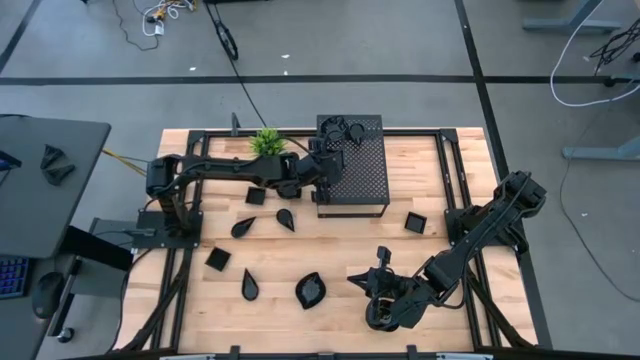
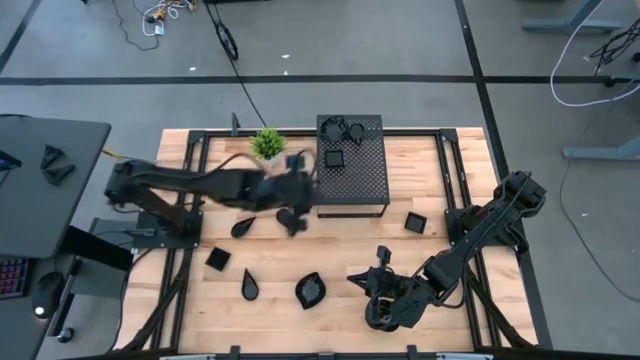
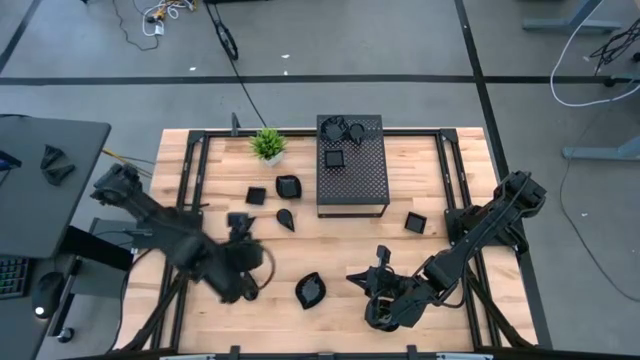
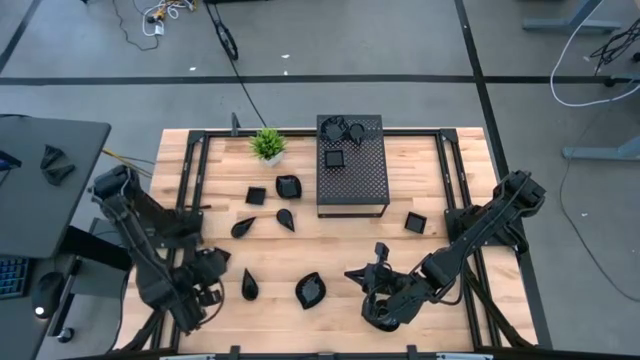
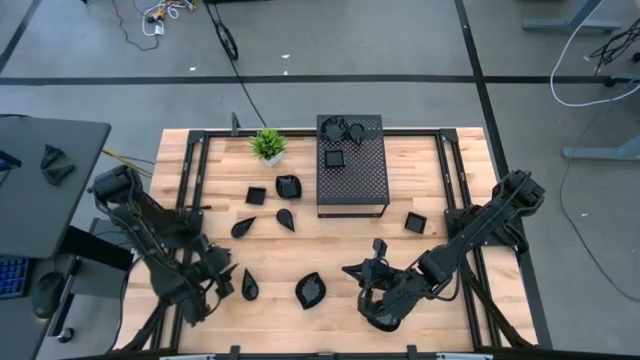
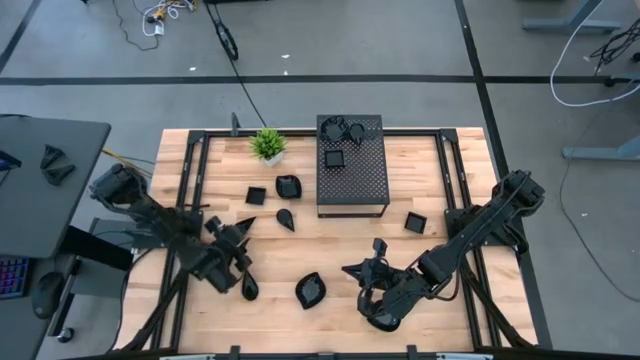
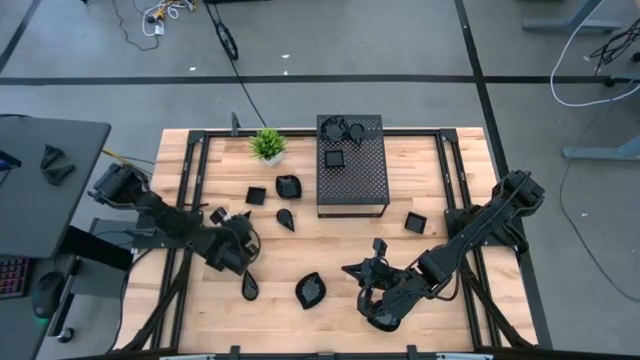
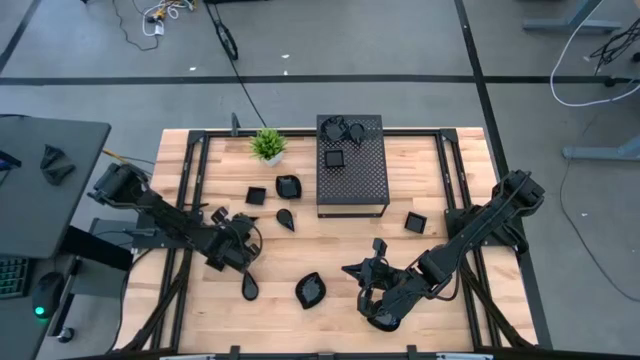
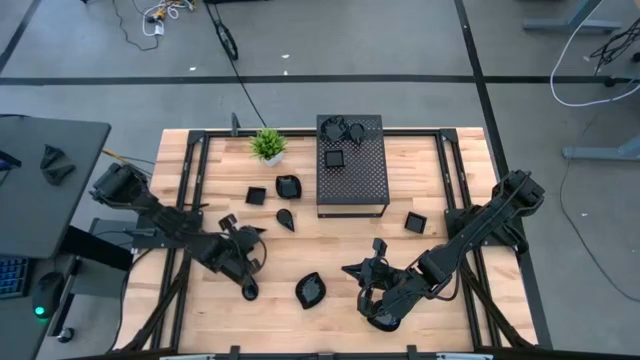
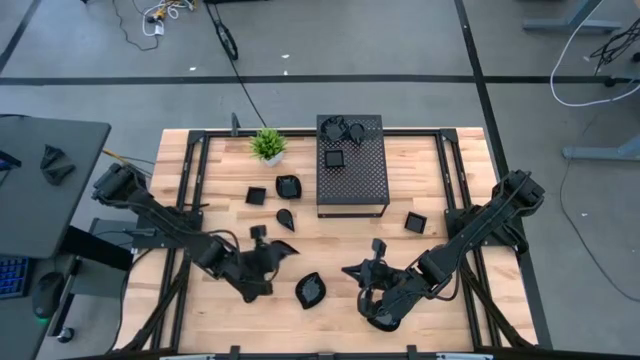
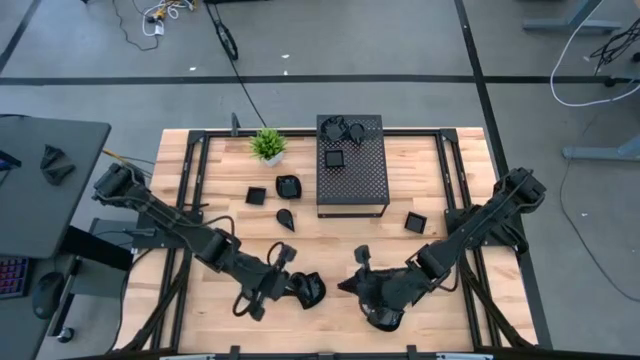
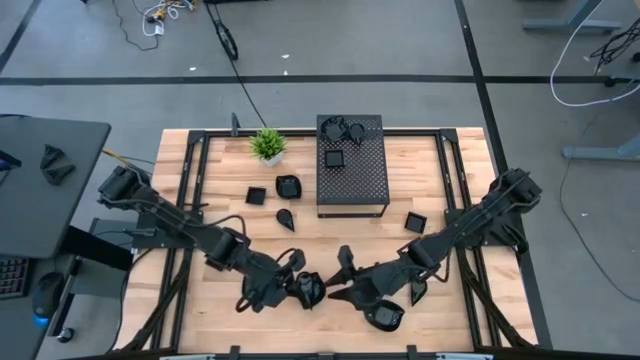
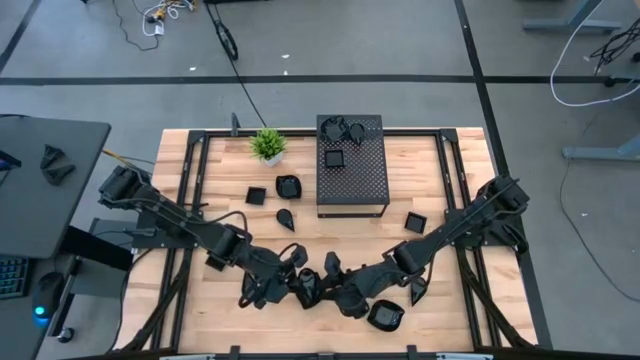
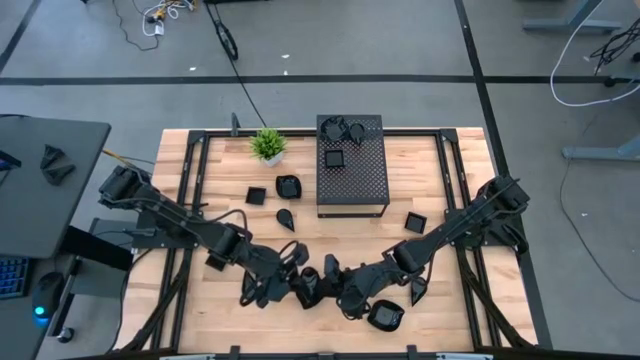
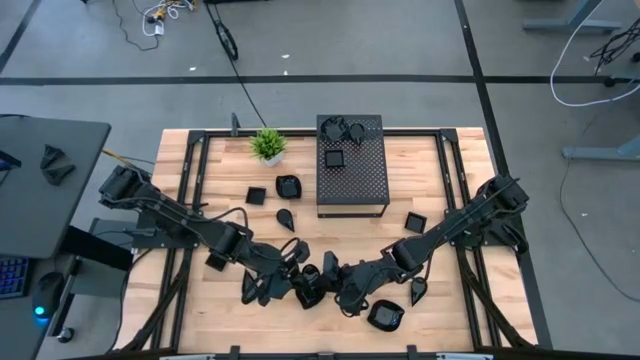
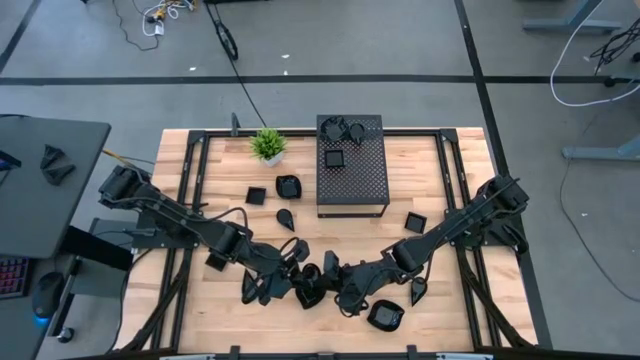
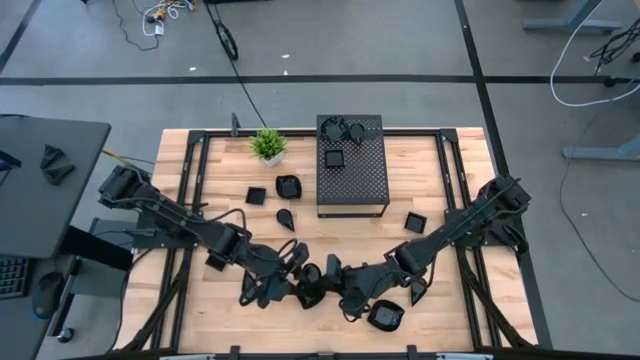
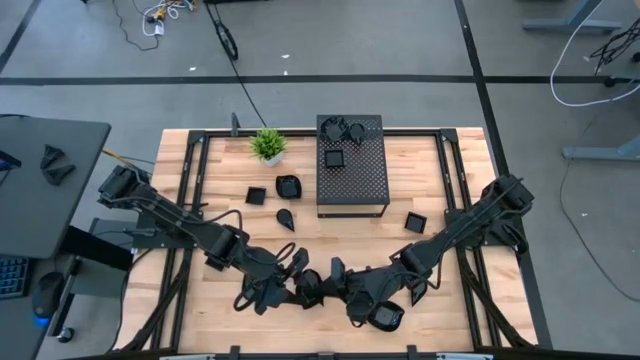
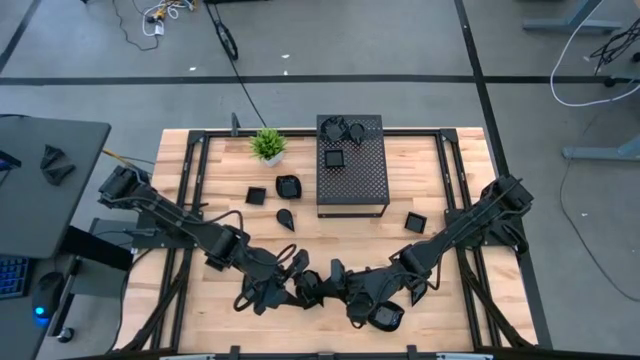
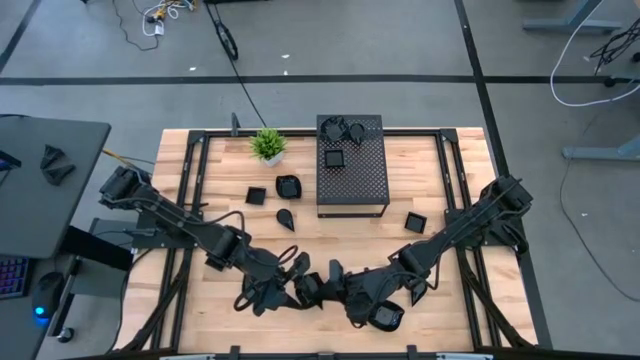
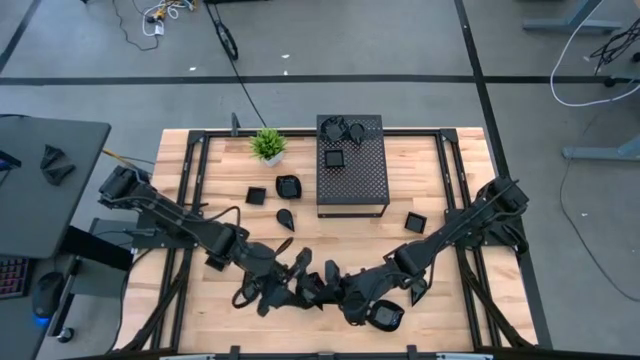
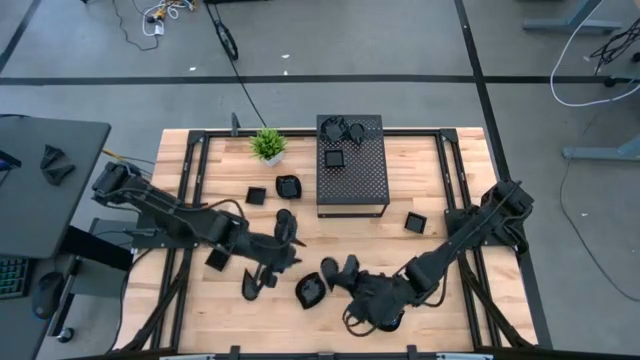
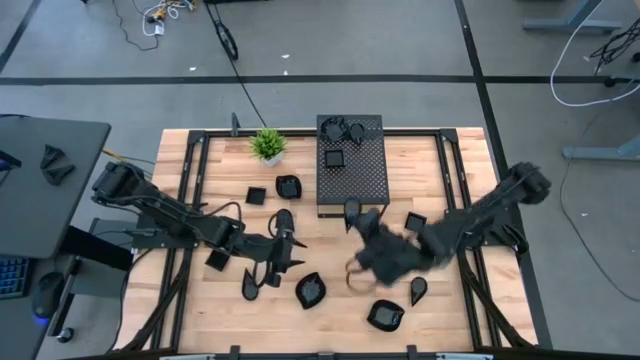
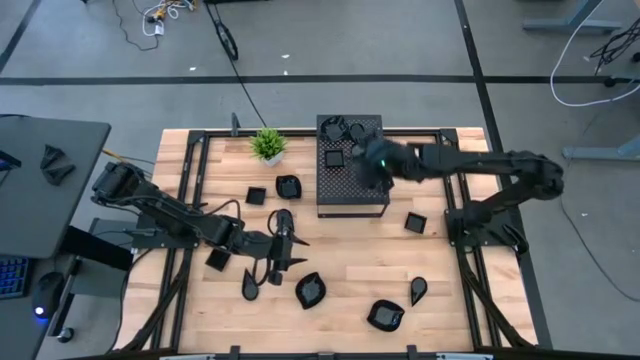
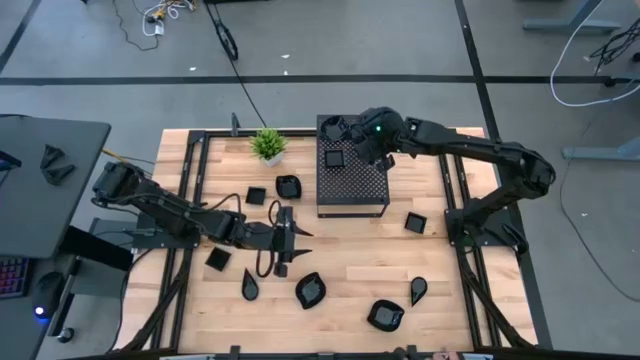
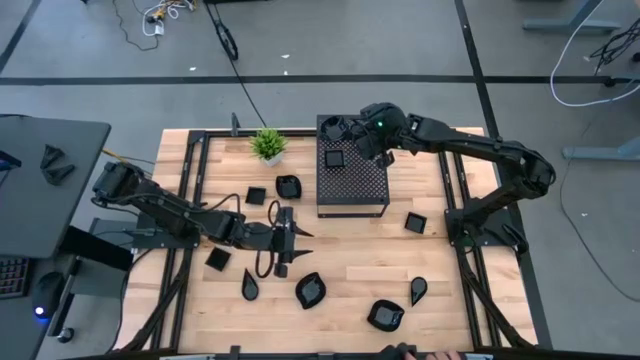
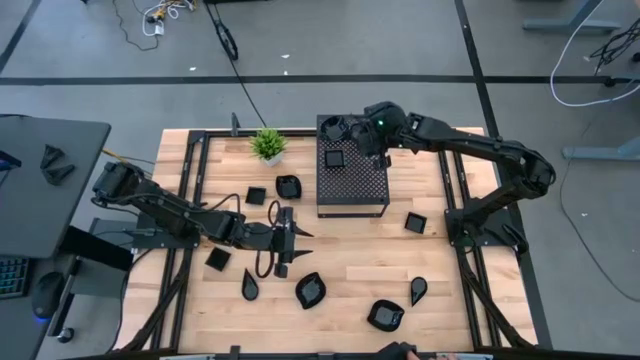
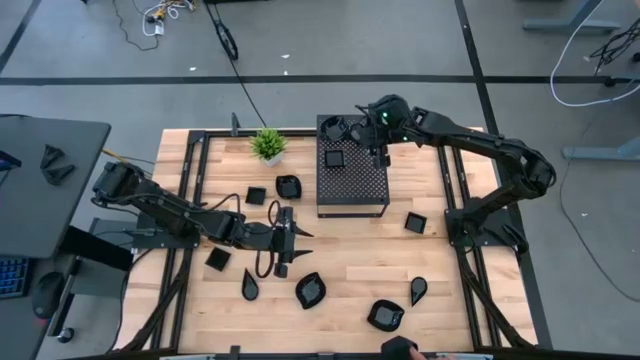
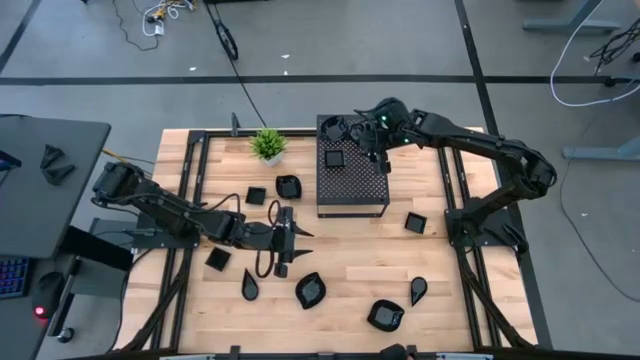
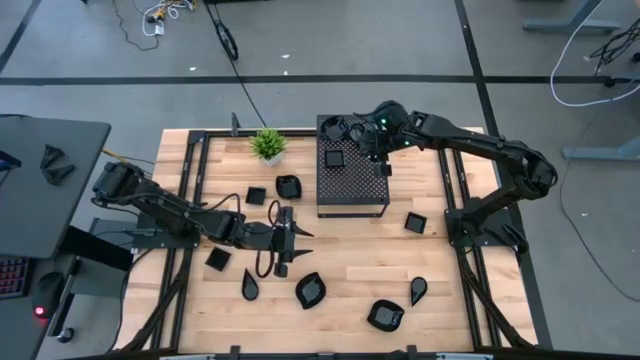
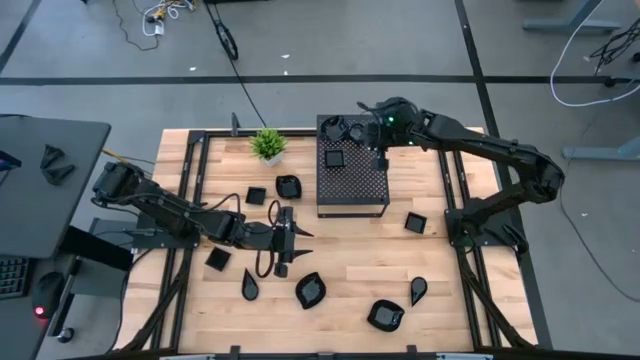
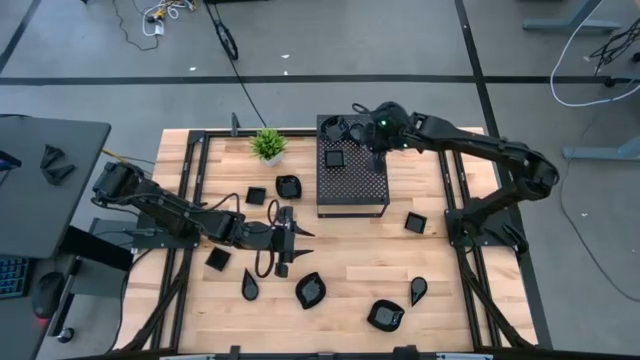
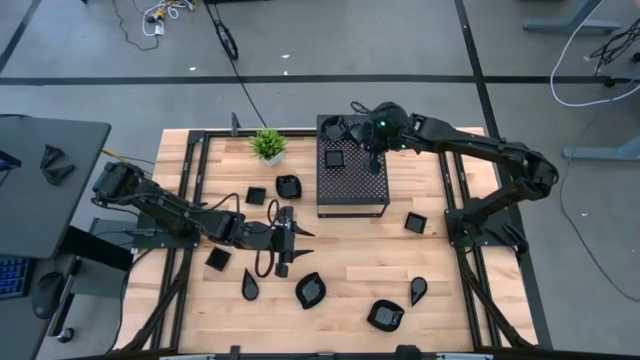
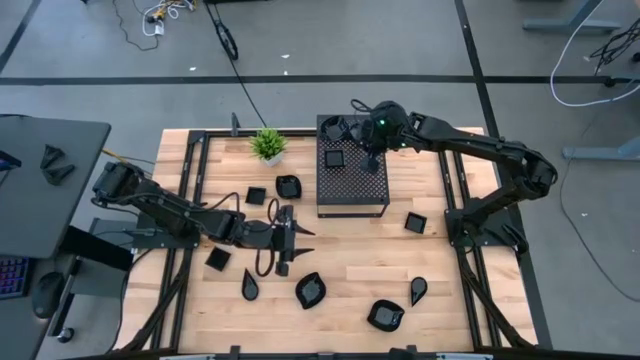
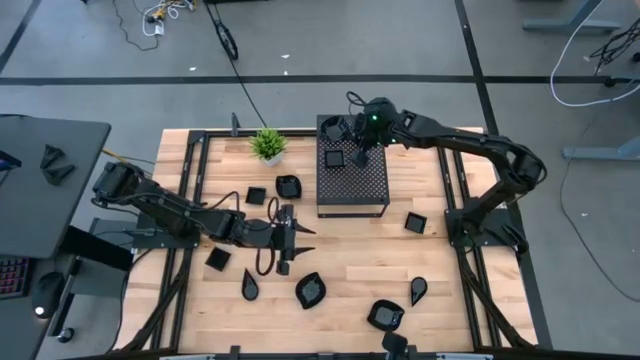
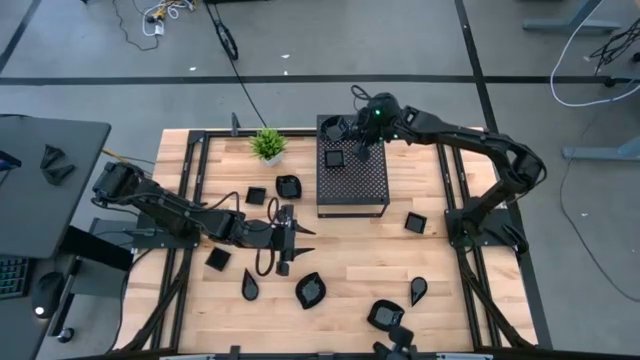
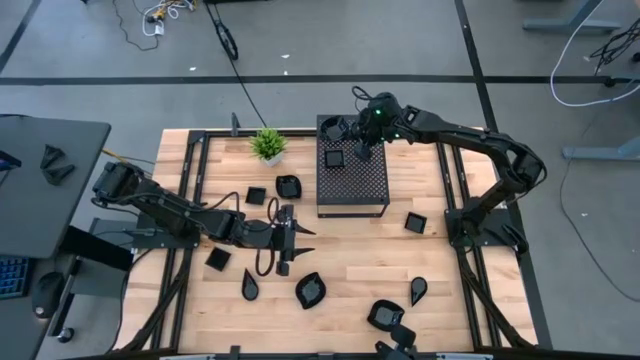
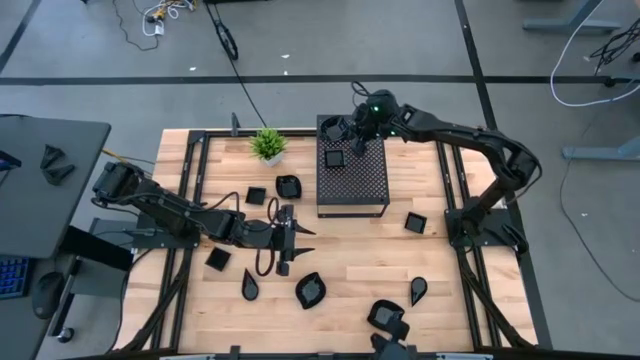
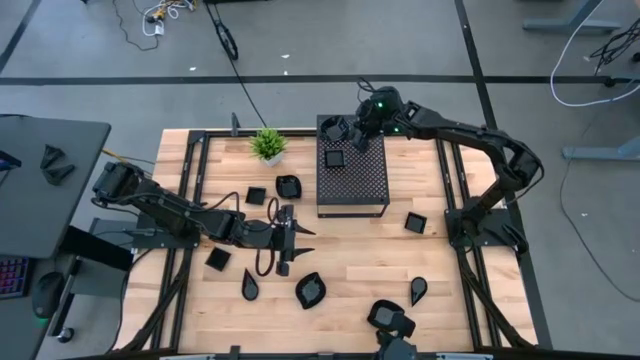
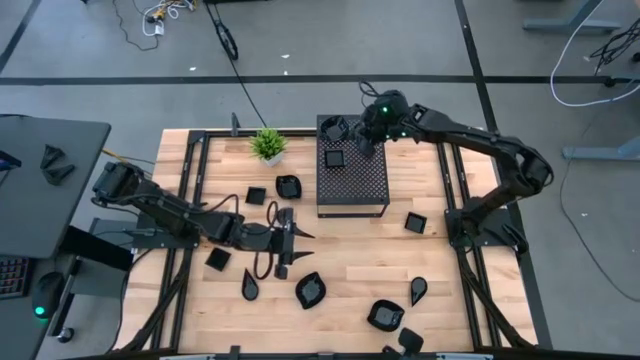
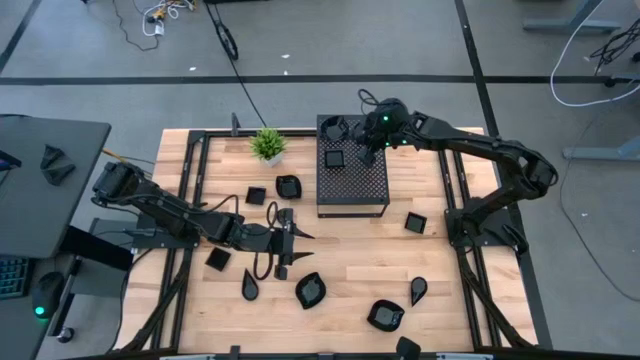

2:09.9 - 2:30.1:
Task: Pick & Place Mini shaped plates
Stack the drop shaped plate on top of the drop shaped plates on the shelf

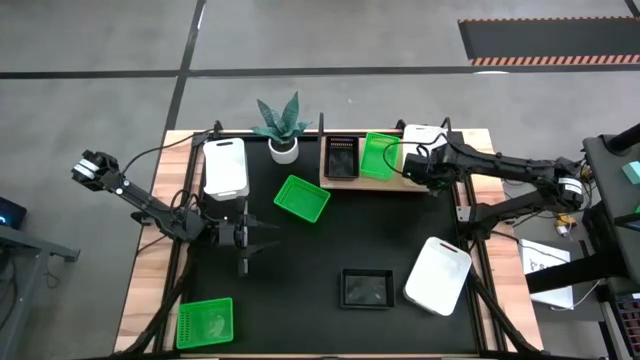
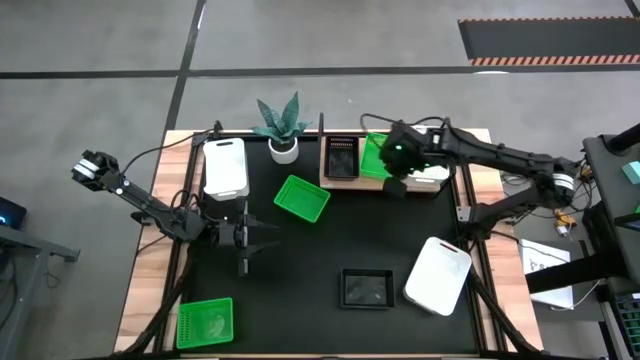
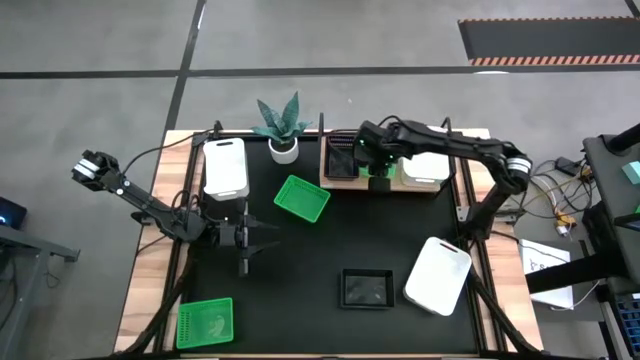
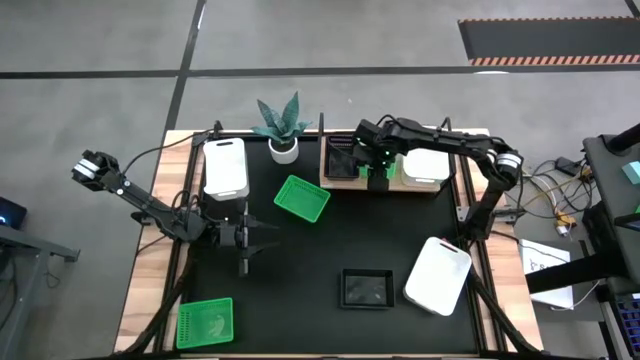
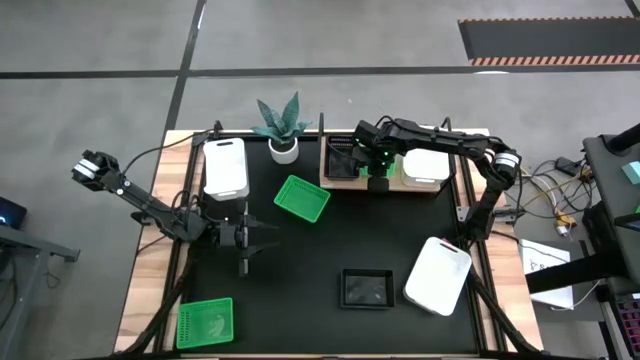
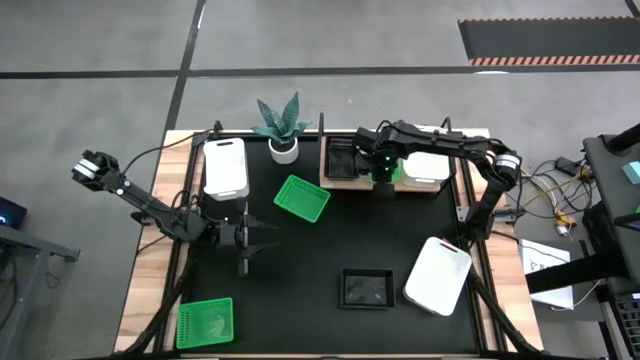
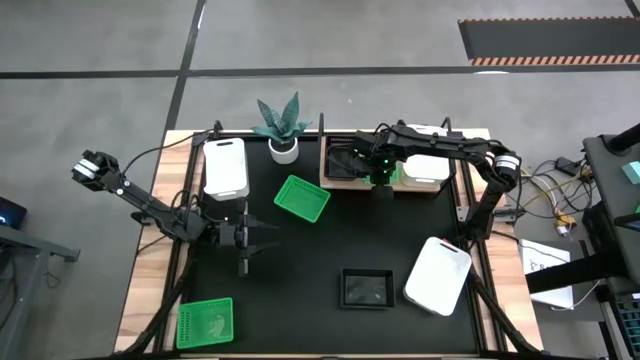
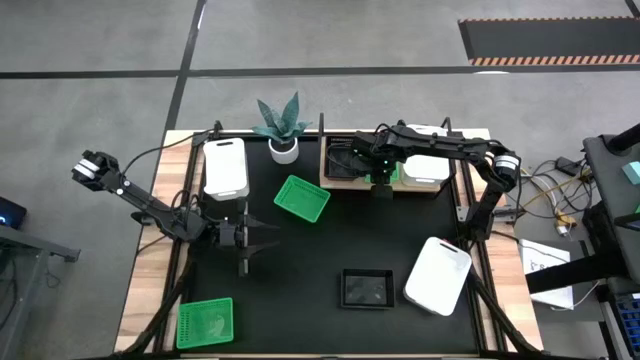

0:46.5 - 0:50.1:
Task: Stack baskets on shelf by color
Adjust the green bin on the shelf
